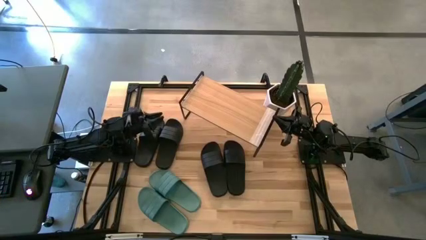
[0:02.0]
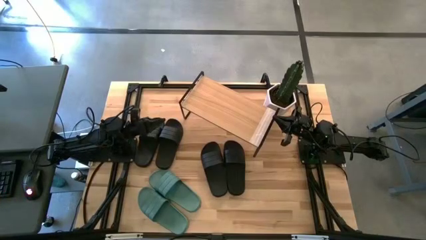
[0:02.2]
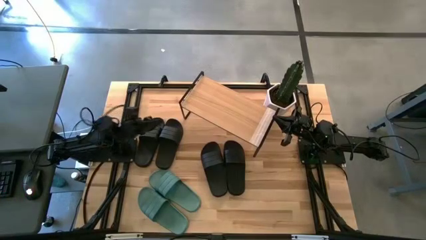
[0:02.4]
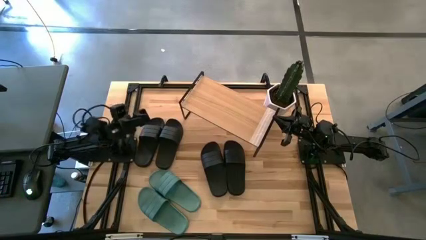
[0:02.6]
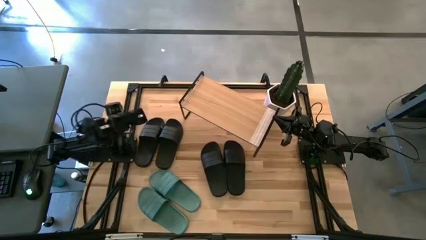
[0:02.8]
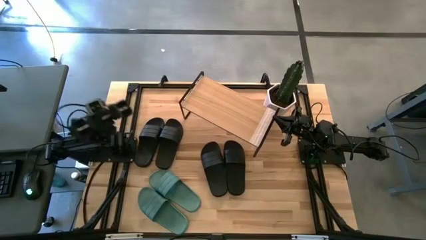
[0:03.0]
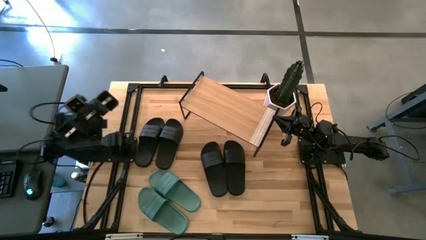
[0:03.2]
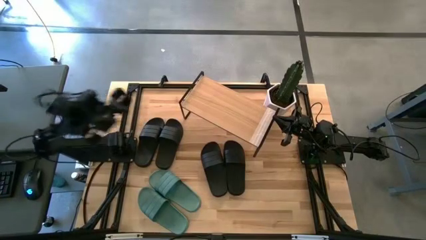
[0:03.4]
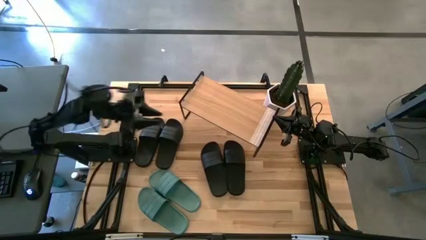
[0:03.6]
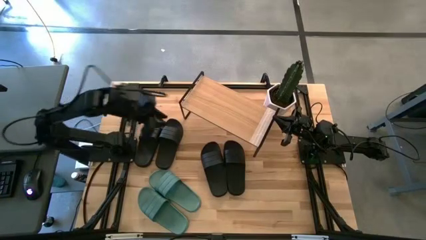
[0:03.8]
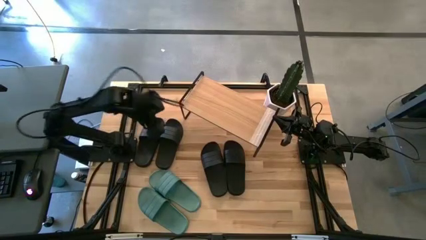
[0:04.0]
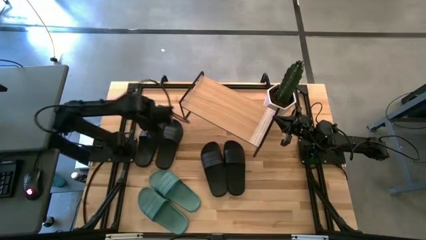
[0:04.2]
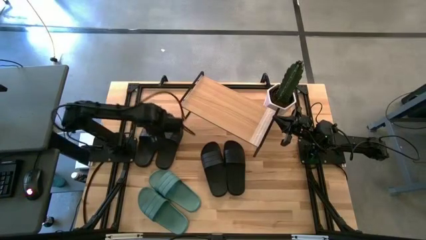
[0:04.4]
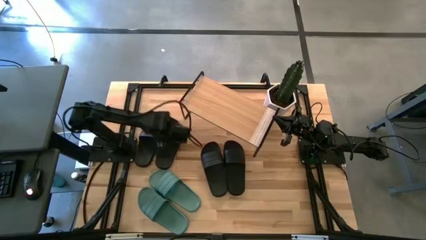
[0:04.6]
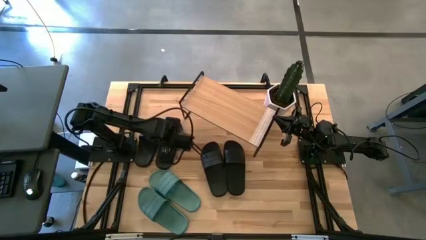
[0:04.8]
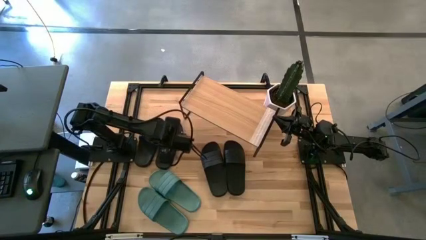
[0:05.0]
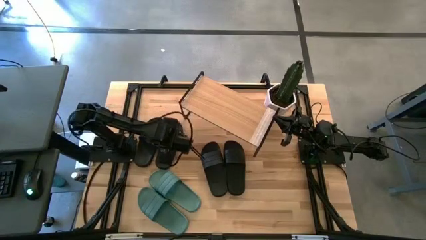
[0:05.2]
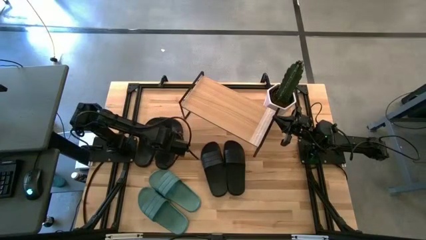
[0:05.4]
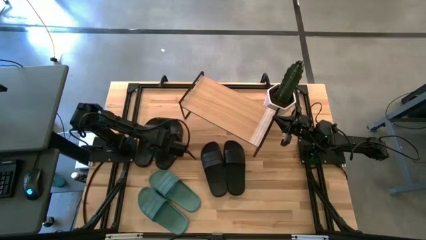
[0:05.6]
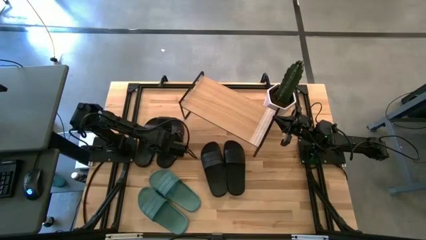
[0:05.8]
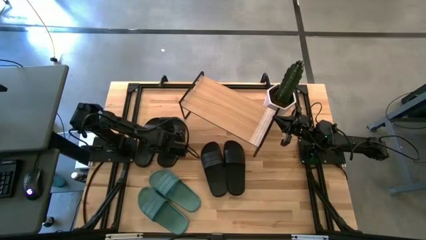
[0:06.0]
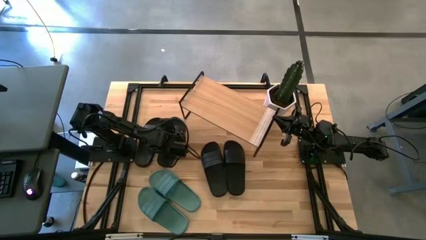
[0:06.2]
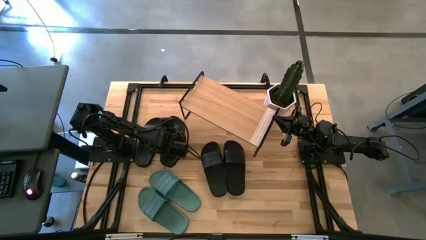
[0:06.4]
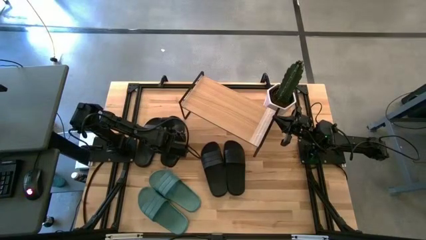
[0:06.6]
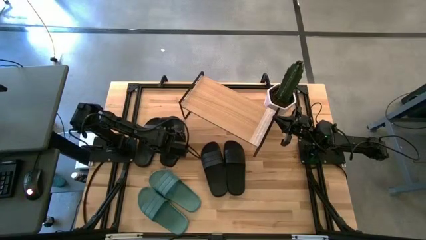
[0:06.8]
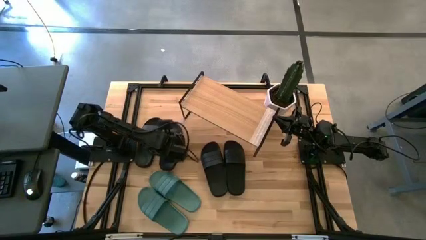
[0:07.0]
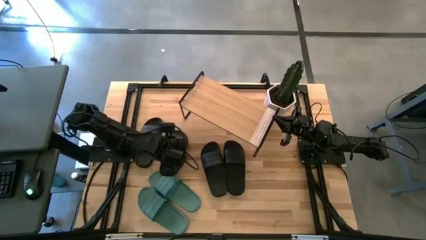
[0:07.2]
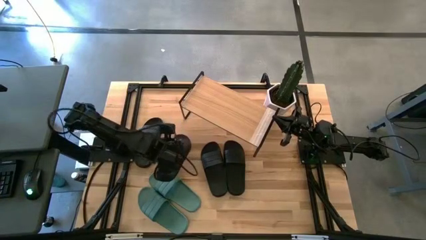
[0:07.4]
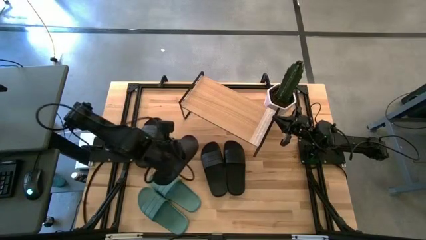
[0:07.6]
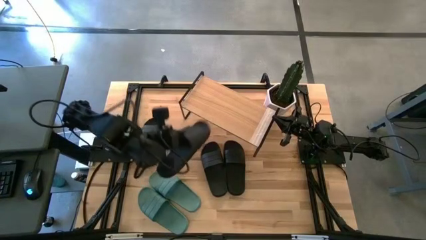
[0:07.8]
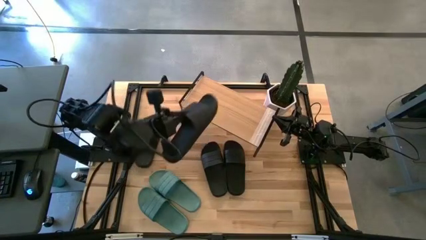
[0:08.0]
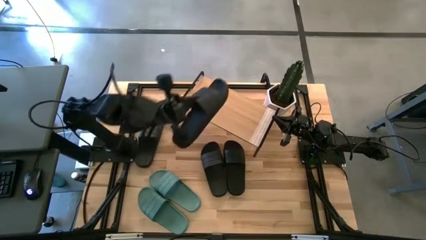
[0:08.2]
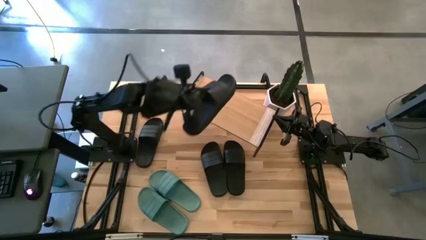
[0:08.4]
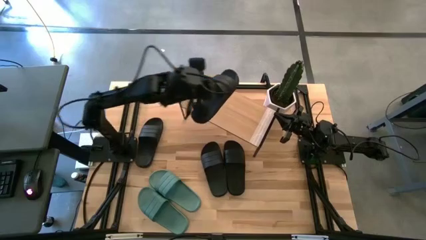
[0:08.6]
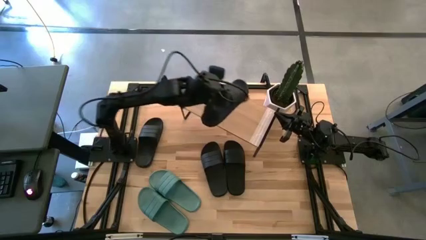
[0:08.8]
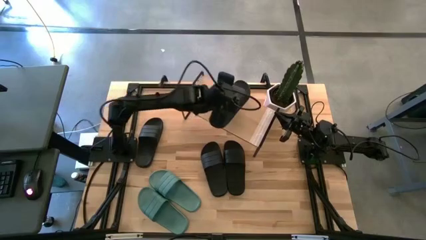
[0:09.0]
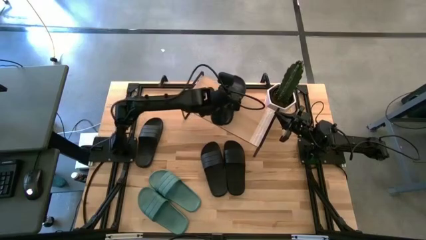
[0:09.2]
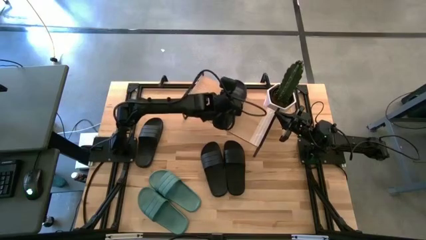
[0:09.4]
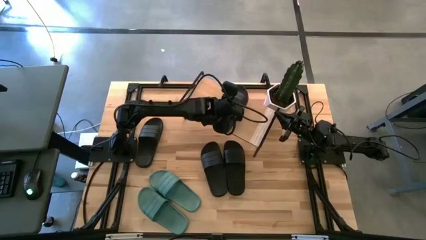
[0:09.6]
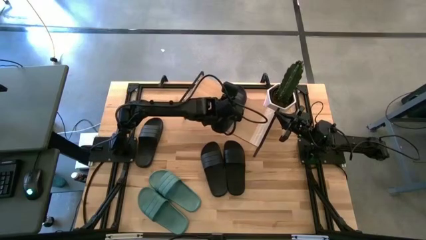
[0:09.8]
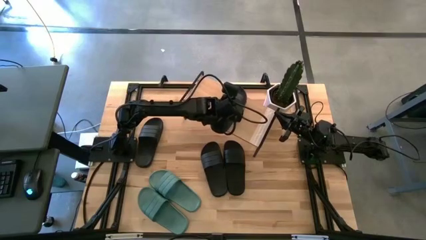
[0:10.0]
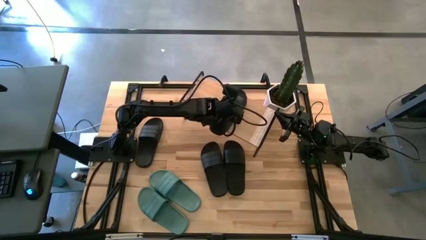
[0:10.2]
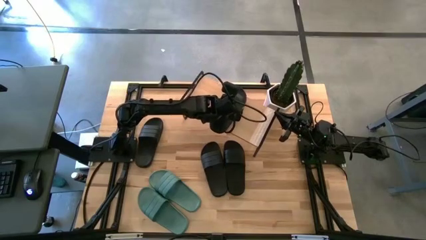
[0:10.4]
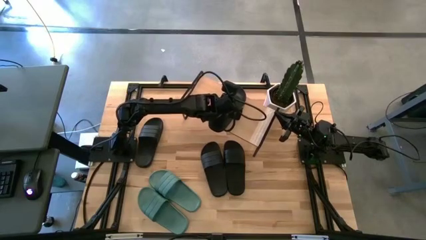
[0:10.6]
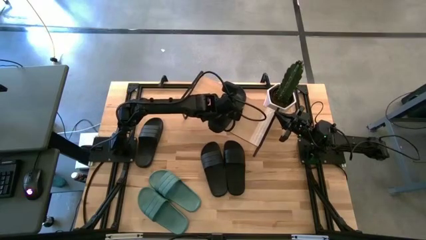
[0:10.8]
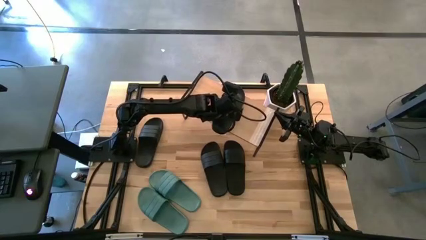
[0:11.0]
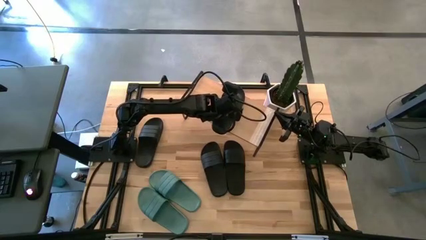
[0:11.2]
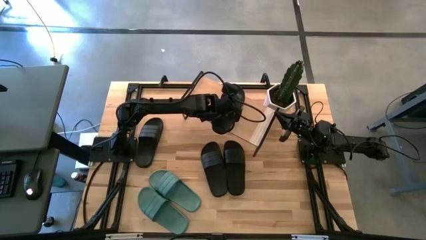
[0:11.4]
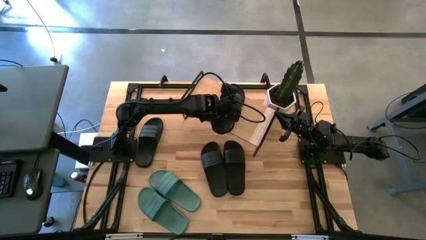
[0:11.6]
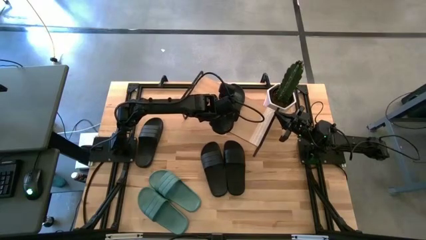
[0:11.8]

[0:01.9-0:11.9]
Task: Pick and place slides into the shelf
Put the black slide on the shelf
